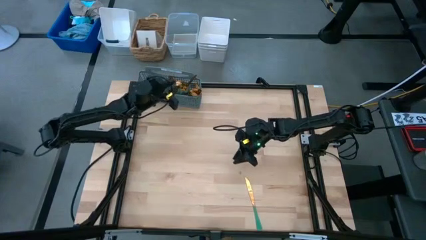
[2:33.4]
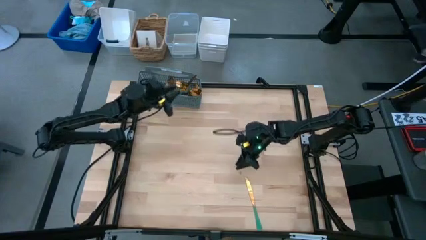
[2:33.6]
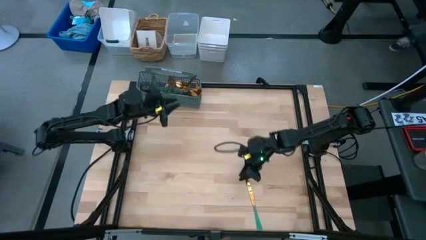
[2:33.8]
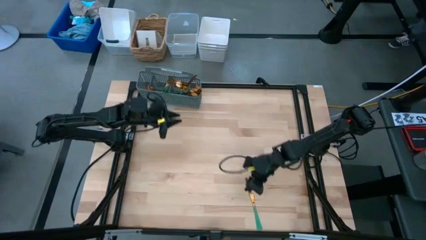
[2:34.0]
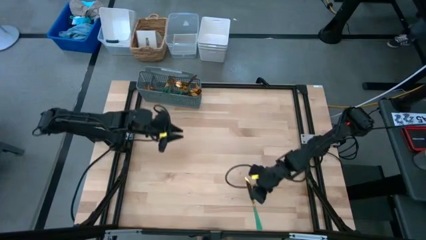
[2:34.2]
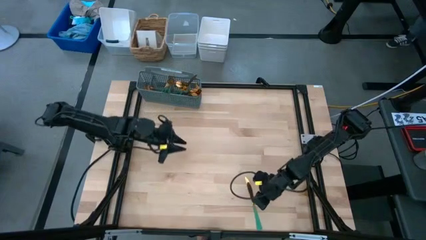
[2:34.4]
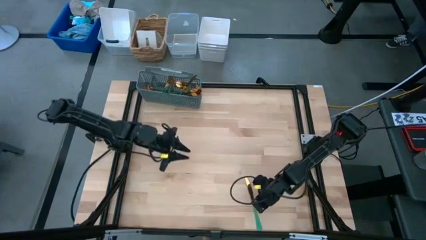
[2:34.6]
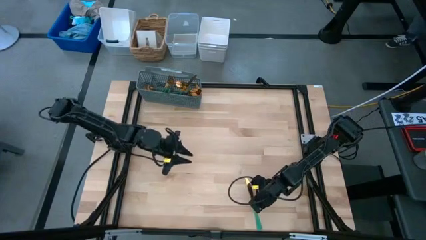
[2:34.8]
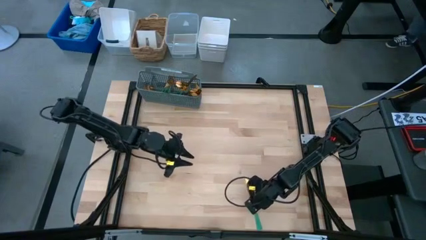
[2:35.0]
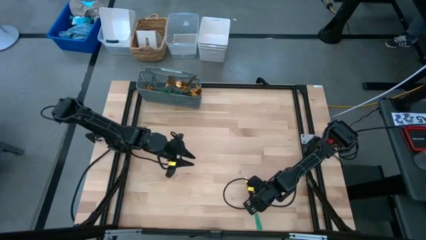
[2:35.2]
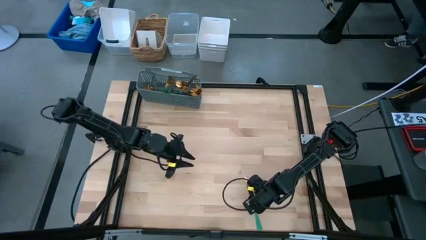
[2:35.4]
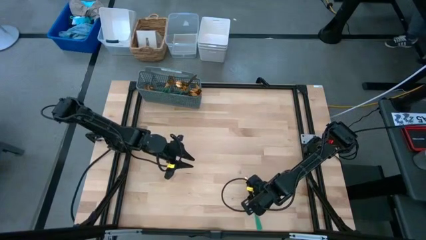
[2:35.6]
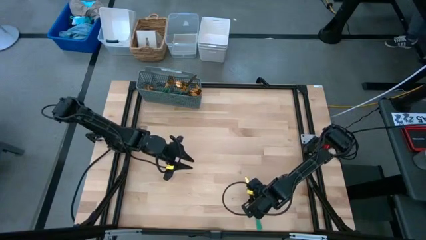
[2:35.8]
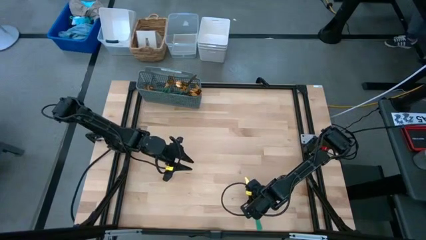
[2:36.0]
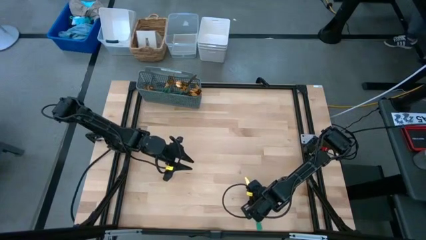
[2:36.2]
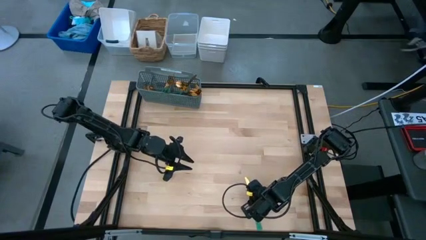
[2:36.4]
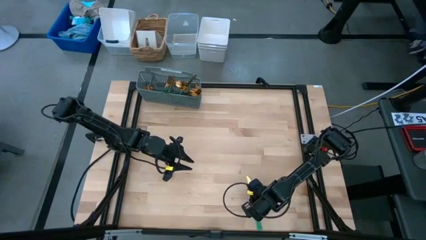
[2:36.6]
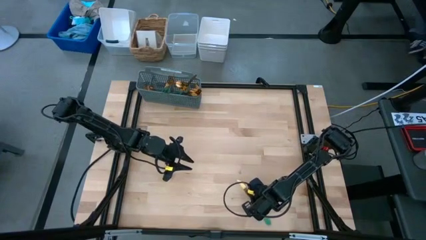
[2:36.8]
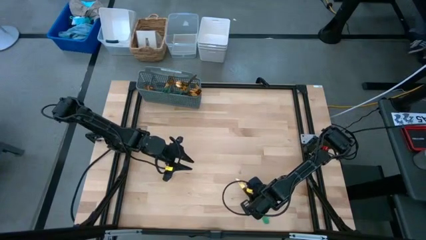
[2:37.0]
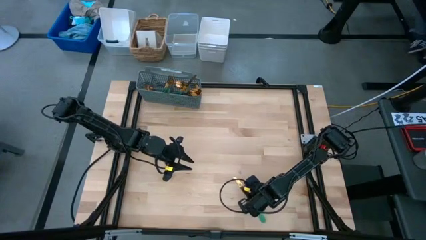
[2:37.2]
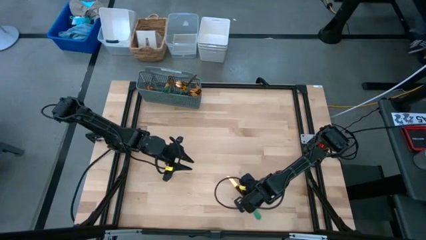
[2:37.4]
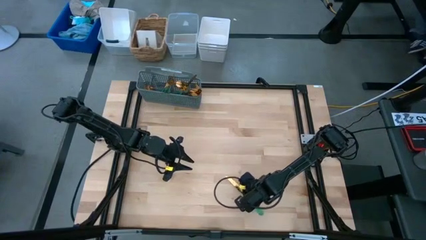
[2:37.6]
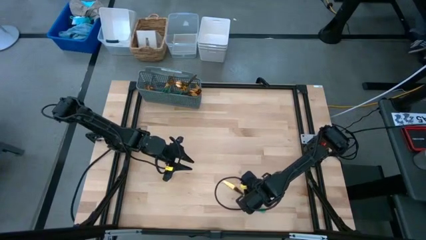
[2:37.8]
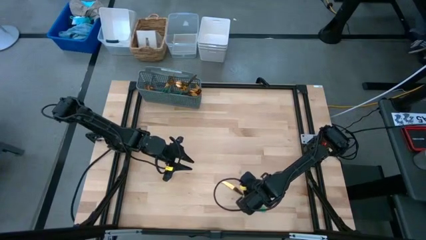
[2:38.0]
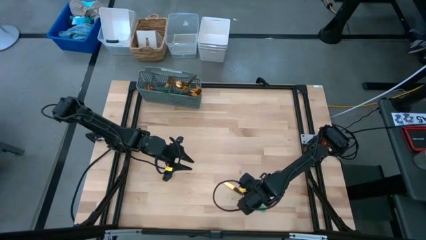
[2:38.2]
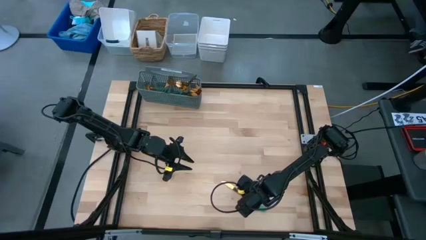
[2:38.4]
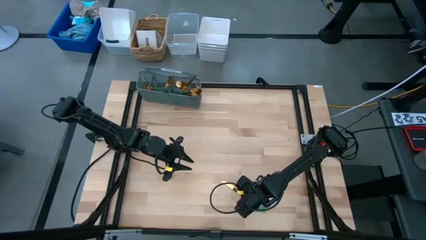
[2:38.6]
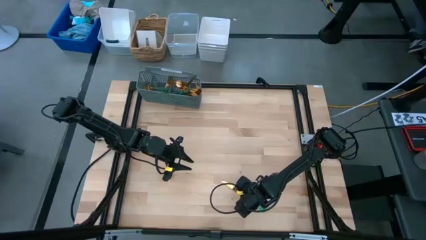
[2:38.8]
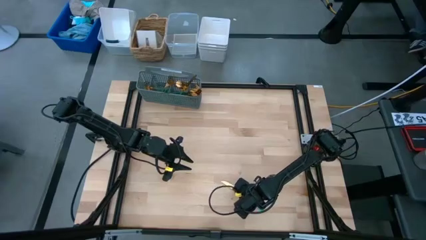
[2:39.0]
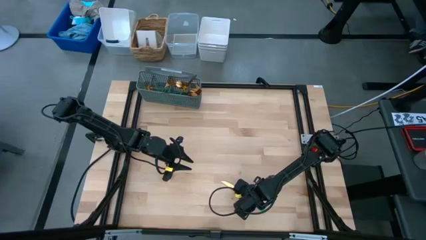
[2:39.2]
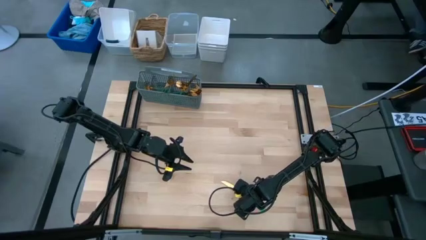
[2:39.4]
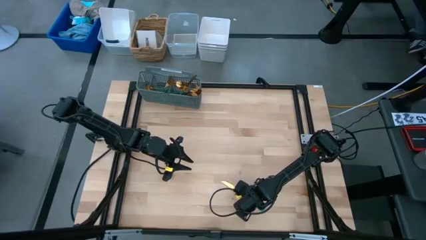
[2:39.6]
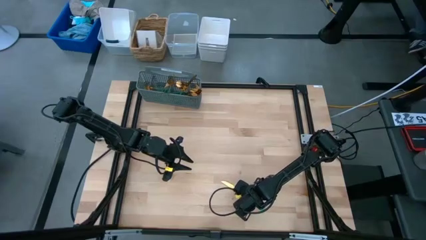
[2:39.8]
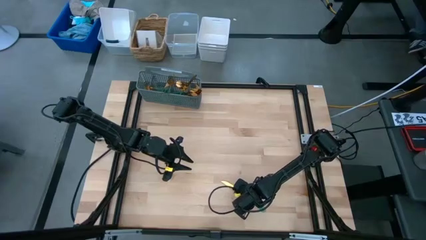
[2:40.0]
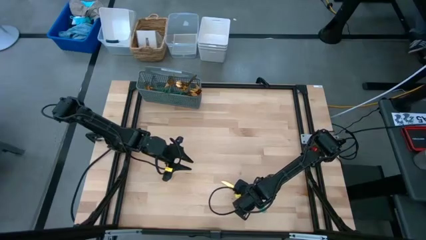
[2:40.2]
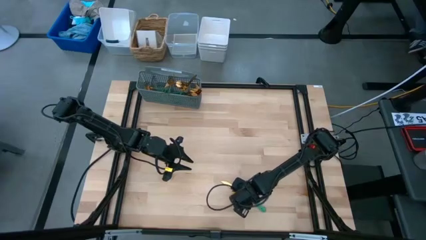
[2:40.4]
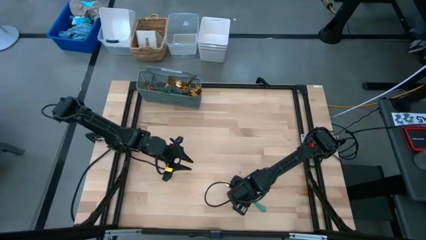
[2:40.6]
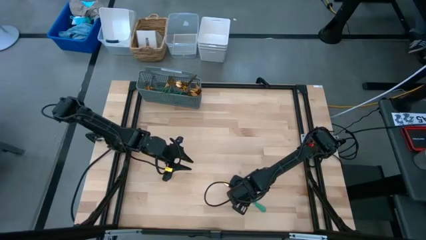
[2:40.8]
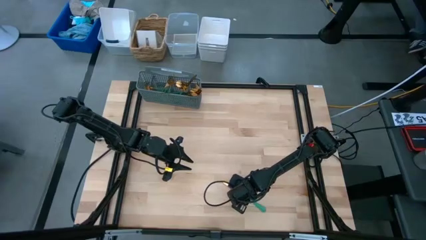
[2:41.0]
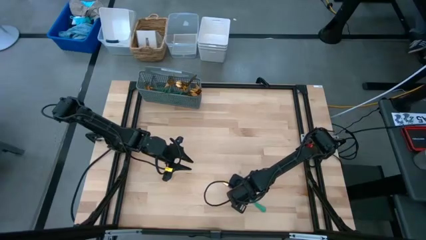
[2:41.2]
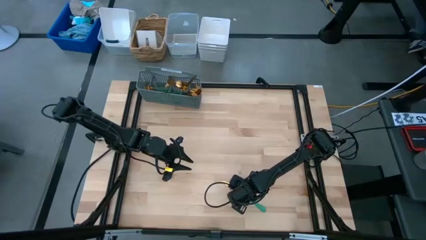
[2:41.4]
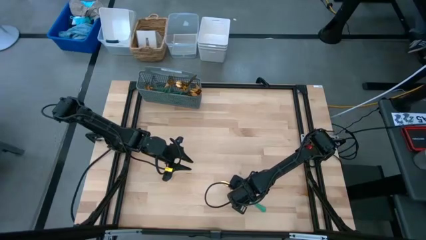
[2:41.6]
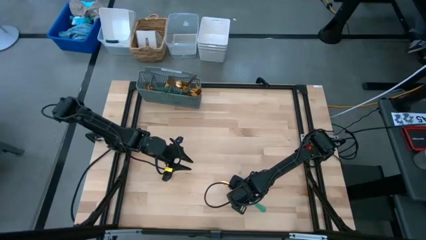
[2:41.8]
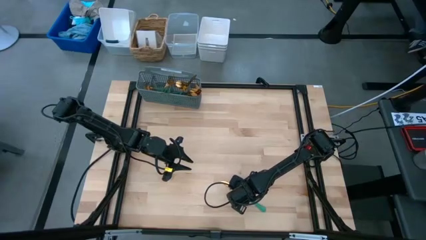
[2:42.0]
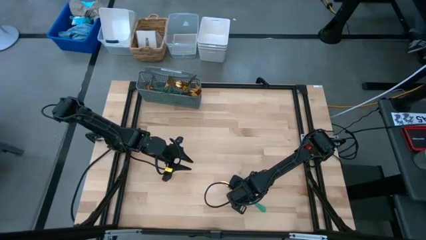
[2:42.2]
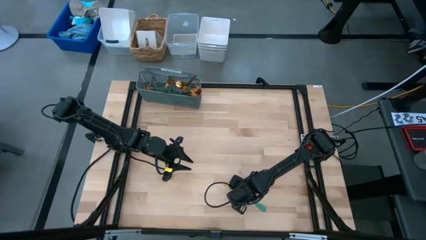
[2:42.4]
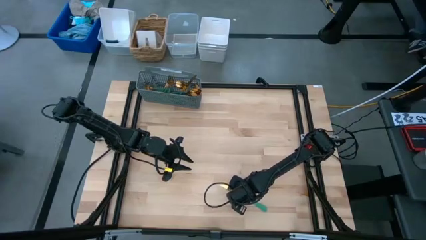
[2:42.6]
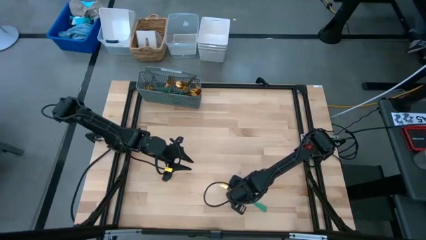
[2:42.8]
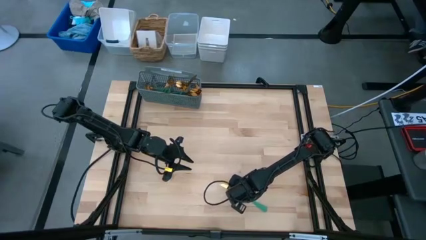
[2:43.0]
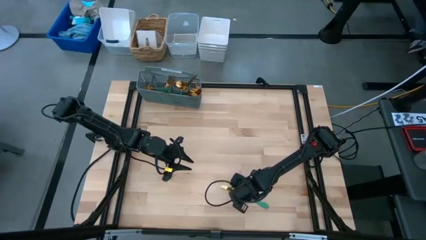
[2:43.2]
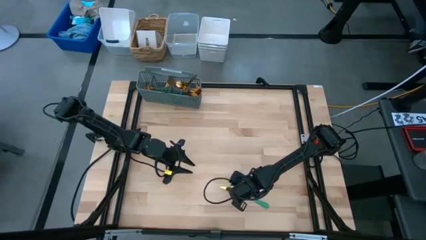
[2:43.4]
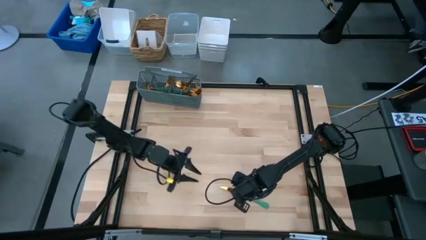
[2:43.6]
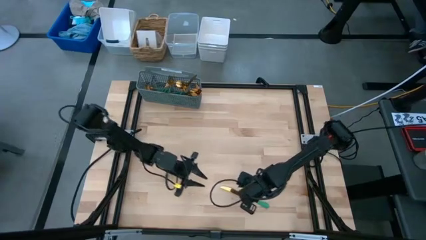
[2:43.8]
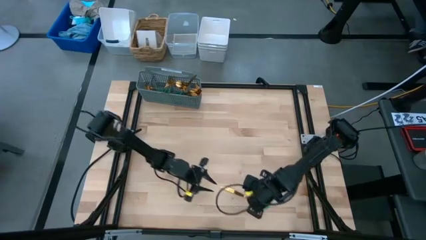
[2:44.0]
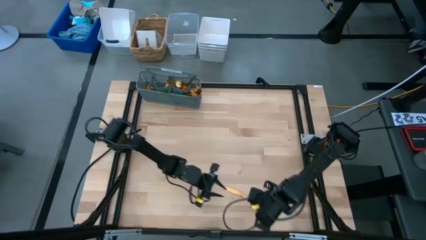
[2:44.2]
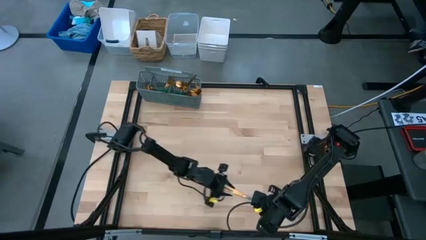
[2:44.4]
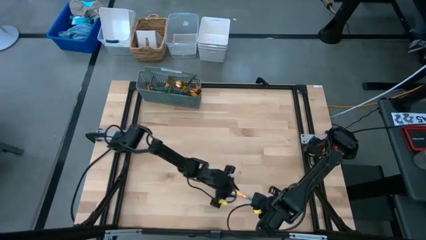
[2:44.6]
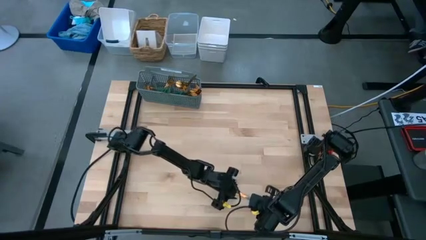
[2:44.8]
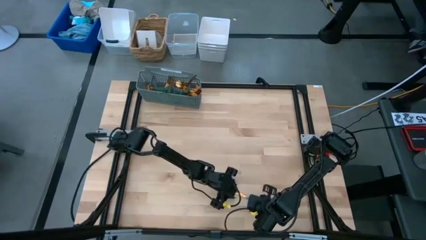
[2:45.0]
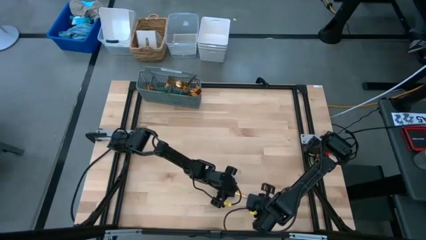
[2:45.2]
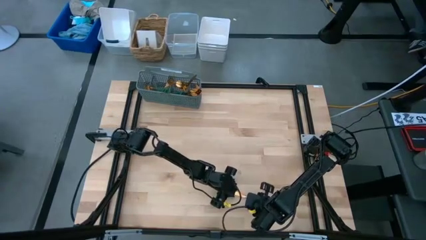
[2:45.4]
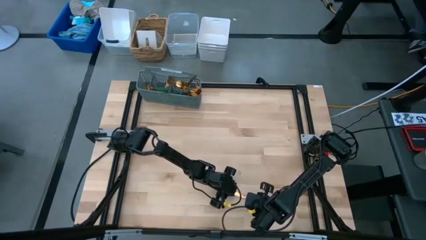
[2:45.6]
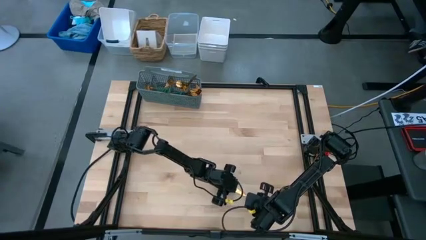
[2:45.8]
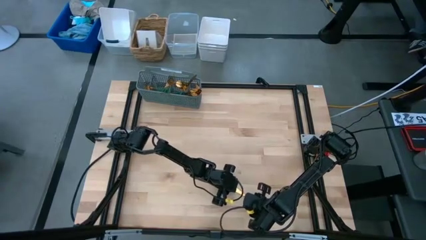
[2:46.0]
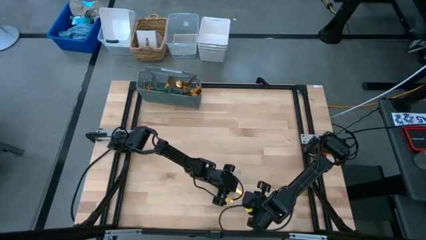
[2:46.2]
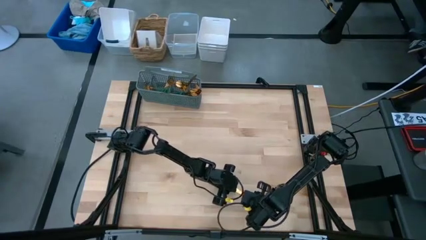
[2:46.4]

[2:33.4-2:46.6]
Task: Sort silverware
Put the green knife into the gray silverware basket

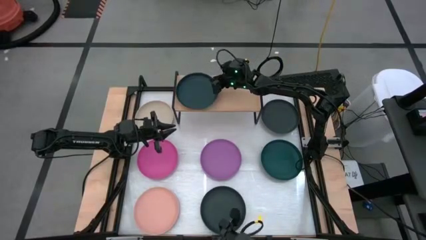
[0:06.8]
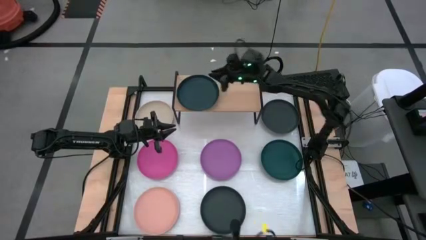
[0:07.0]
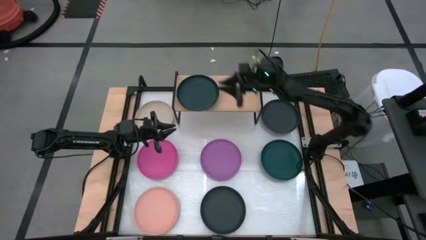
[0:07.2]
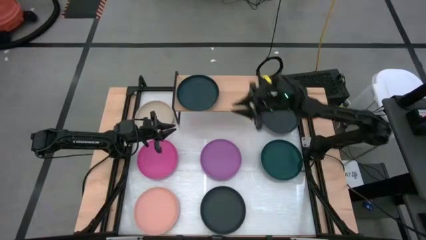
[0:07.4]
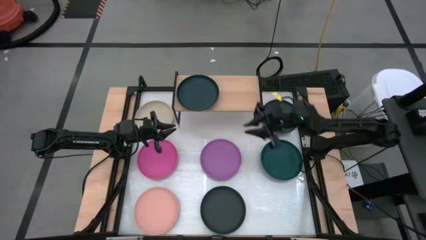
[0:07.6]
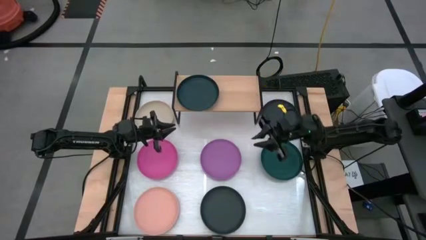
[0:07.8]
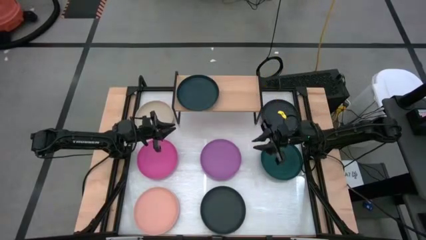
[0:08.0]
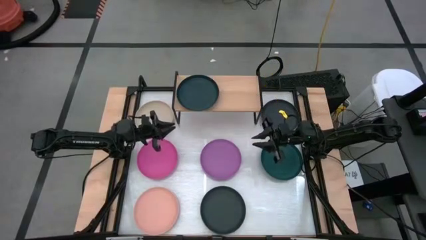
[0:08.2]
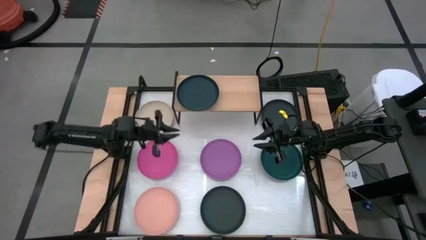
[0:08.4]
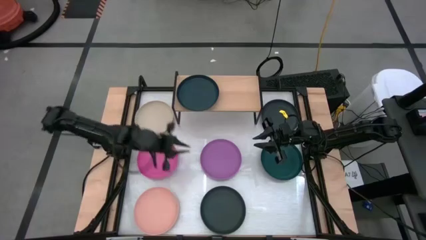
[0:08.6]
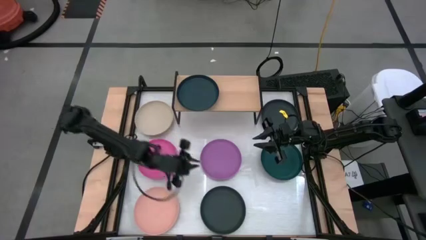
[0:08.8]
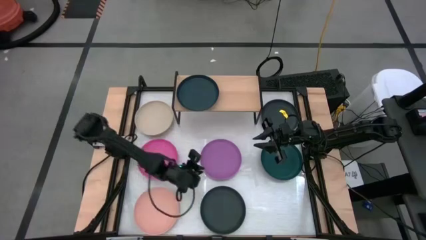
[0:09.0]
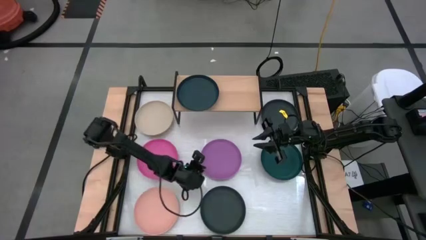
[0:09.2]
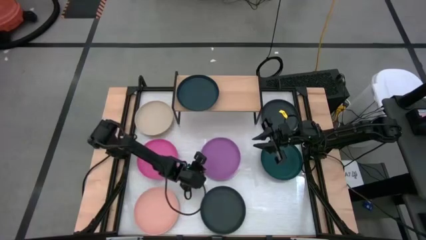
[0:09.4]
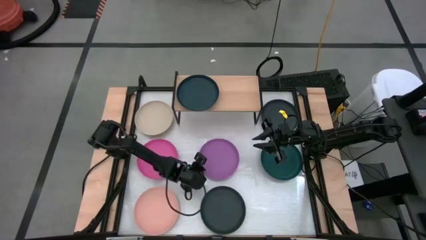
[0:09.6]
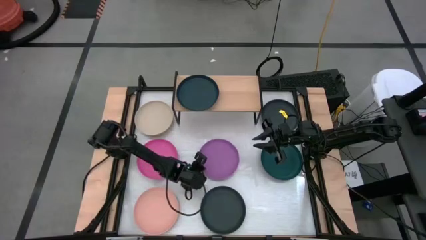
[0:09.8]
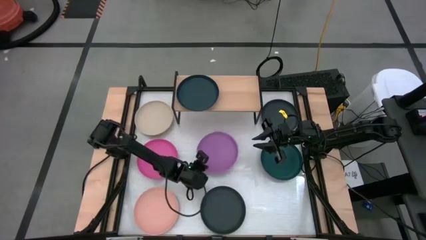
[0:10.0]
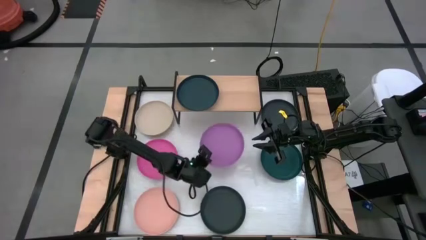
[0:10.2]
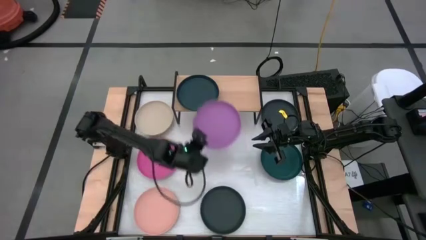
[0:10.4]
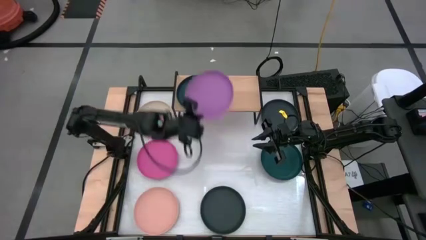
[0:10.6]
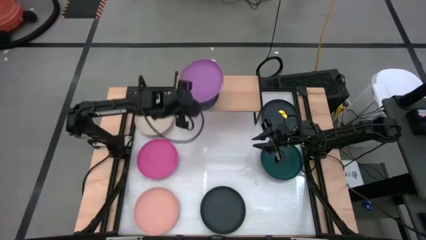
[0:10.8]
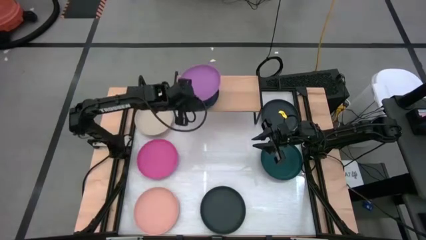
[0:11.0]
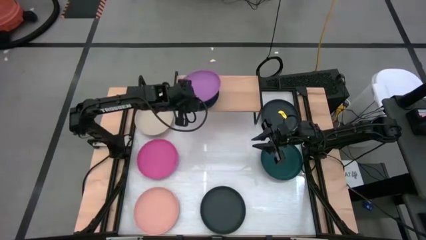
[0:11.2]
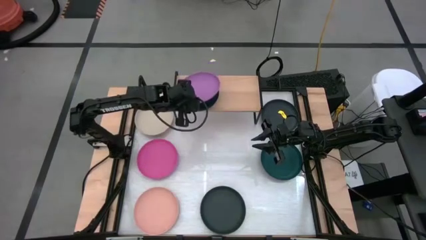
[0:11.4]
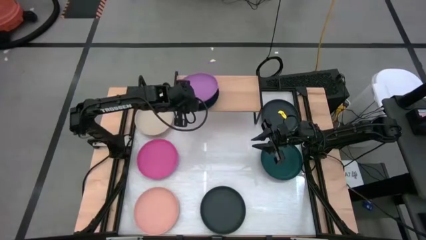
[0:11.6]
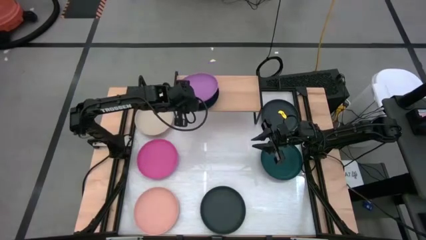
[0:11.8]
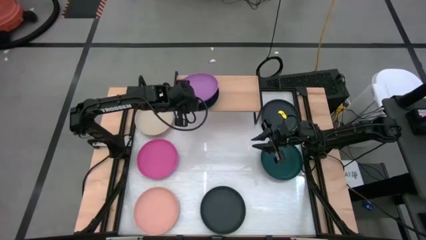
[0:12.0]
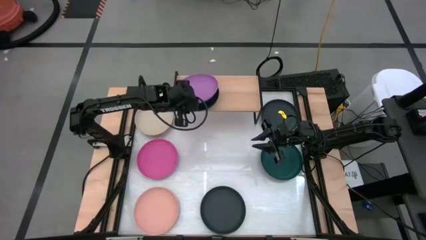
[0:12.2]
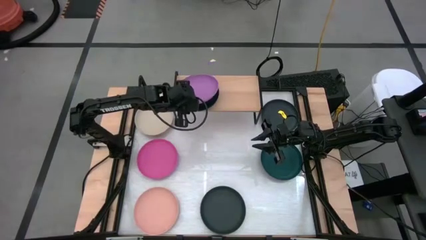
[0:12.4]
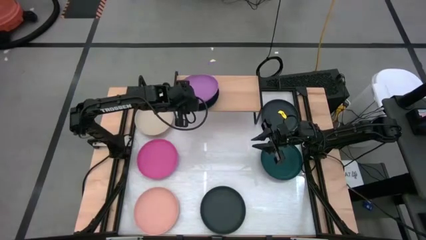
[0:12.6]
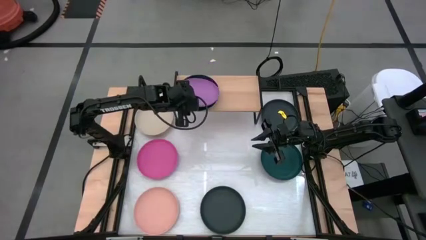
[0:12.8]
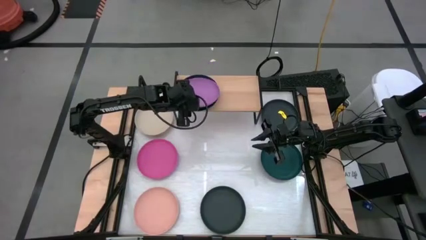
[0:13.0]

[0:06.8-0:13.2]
Task: Place and stack plates onto a shelf
Stack the purple plate on top of the dark green plate on the shelf
